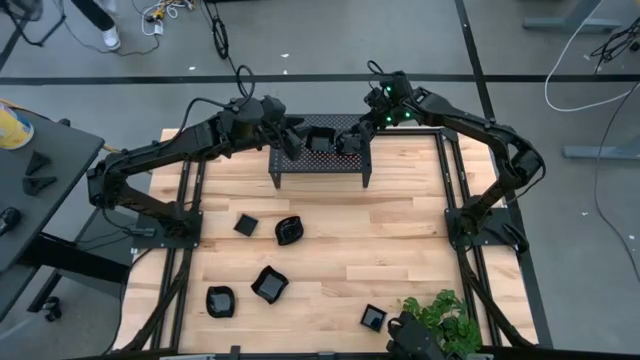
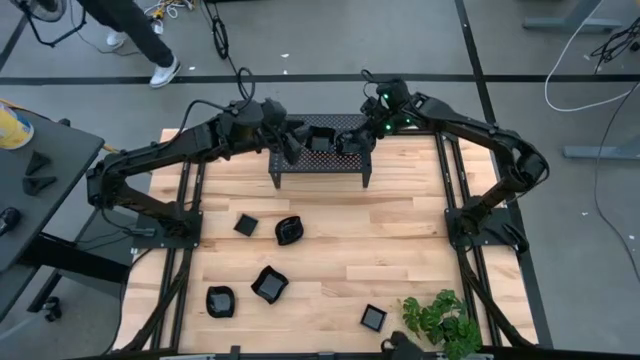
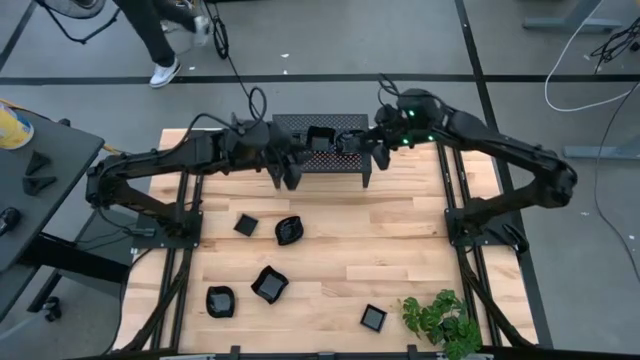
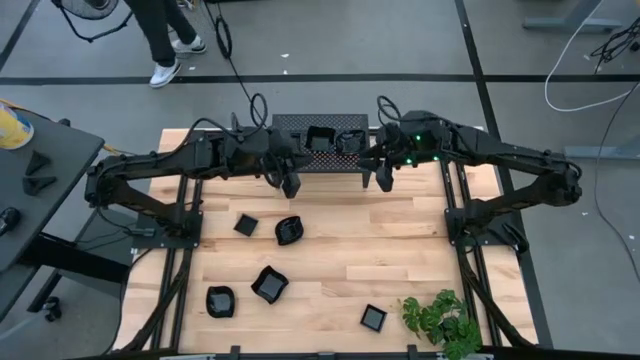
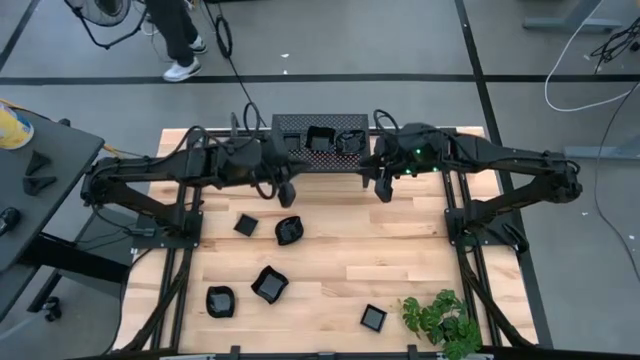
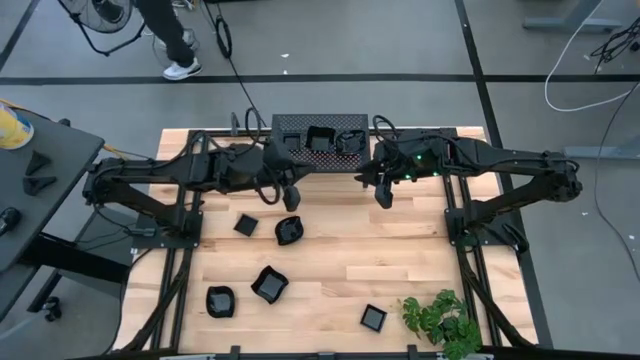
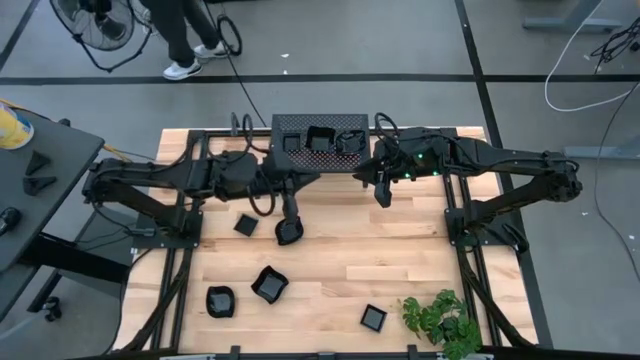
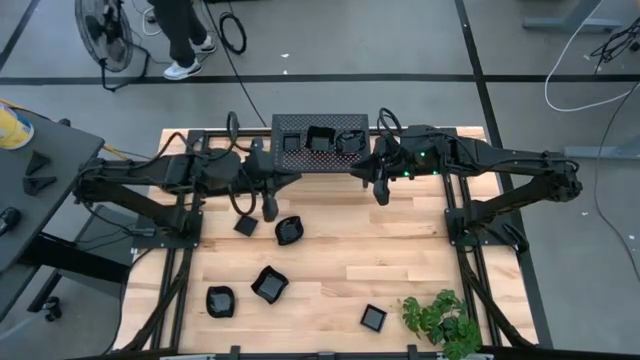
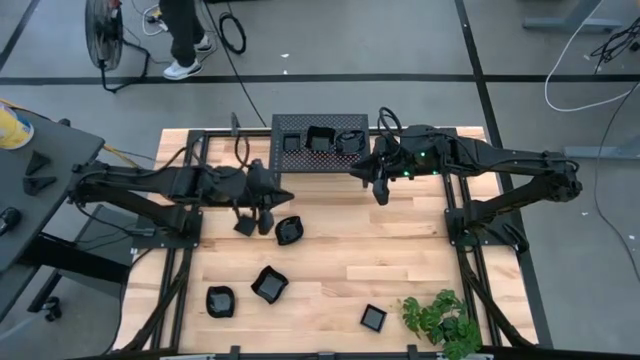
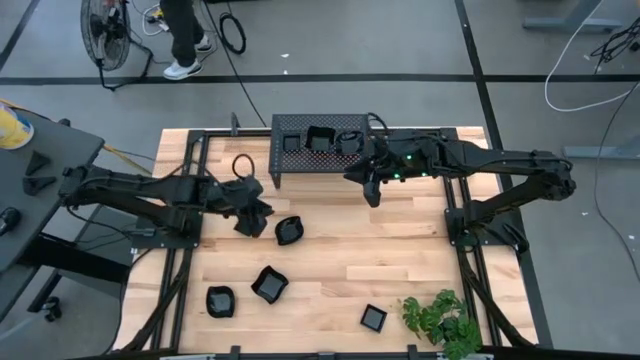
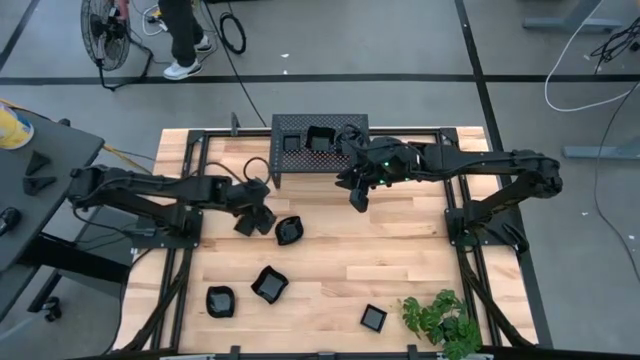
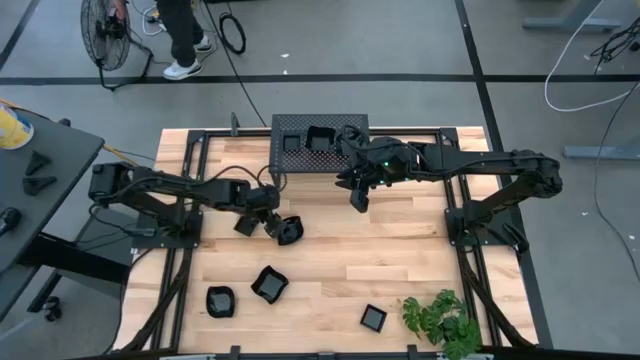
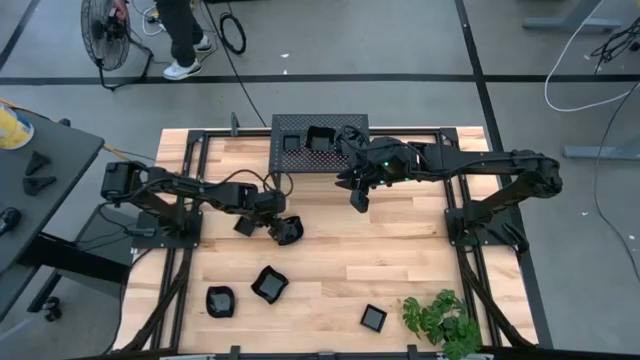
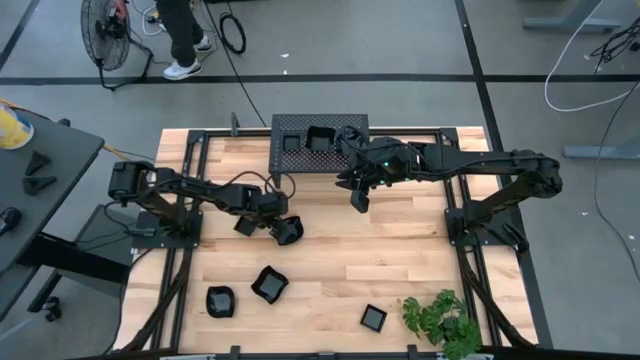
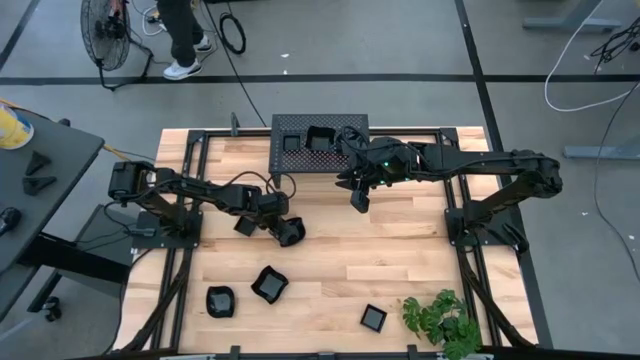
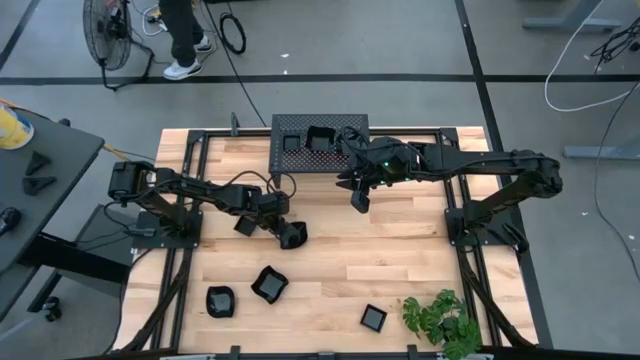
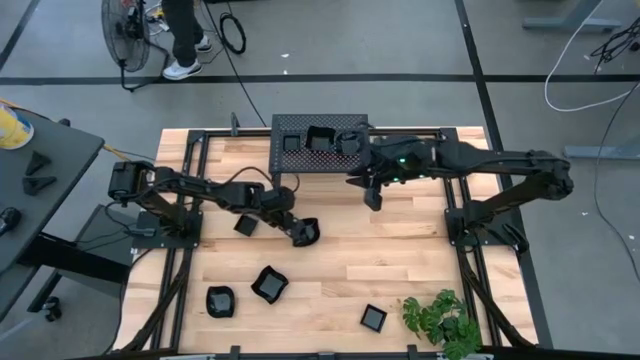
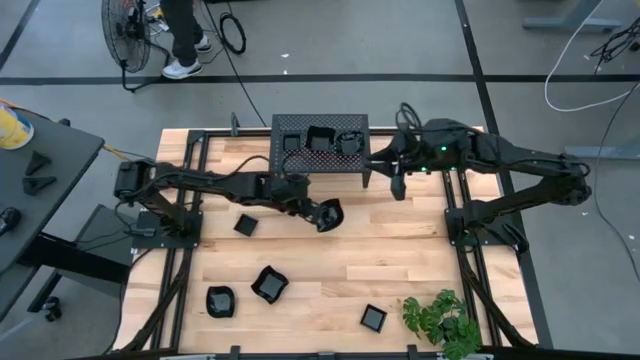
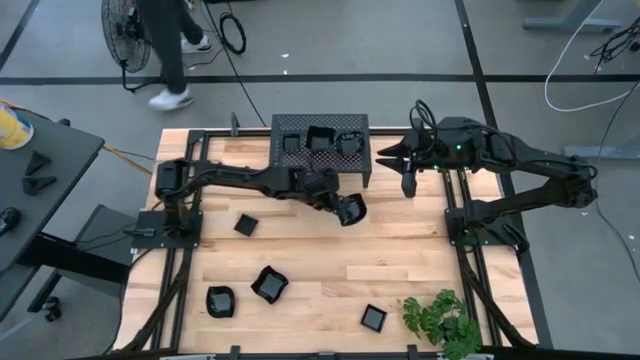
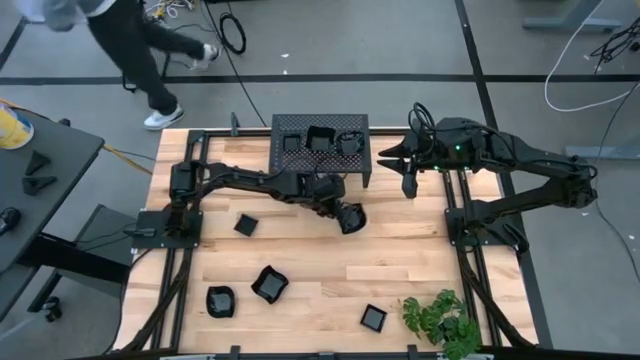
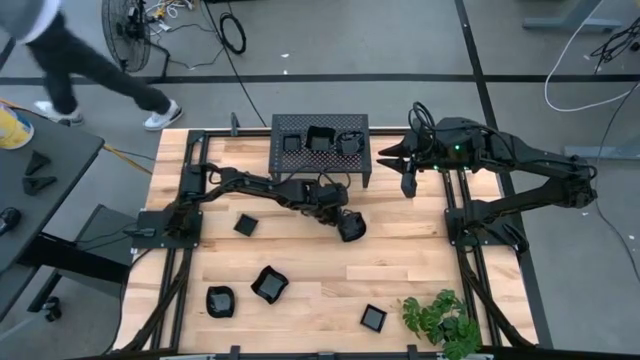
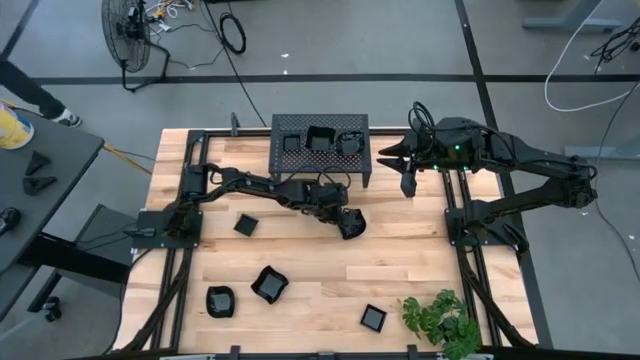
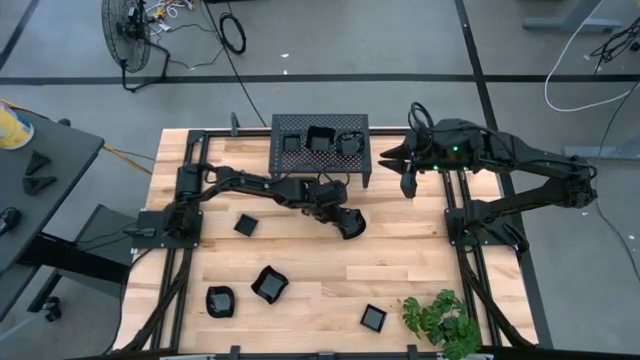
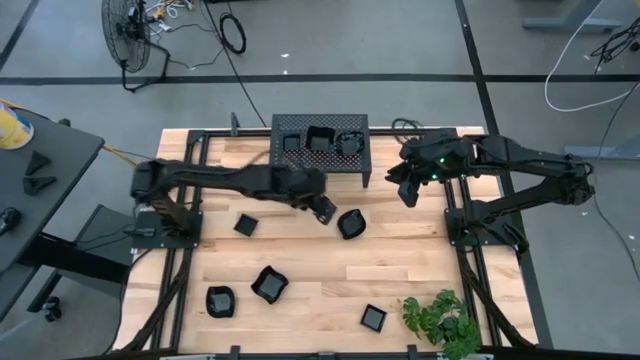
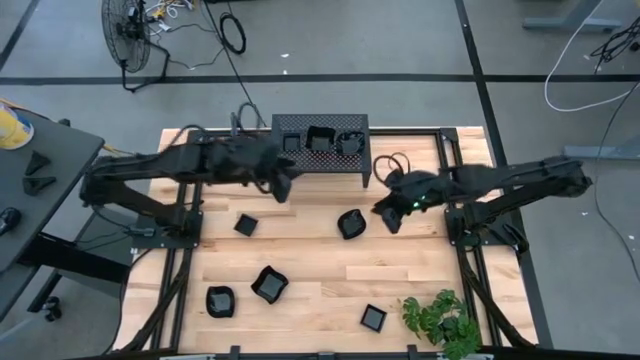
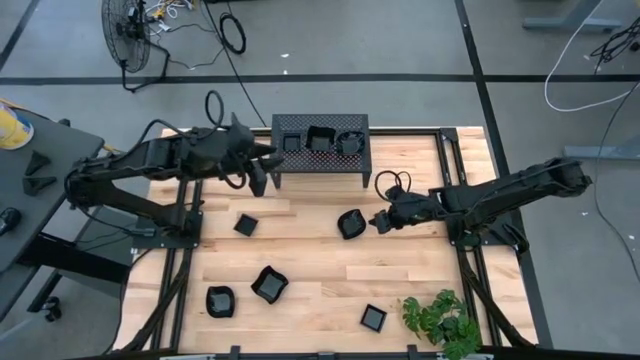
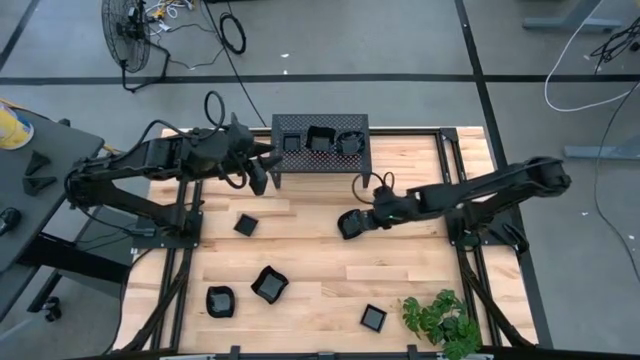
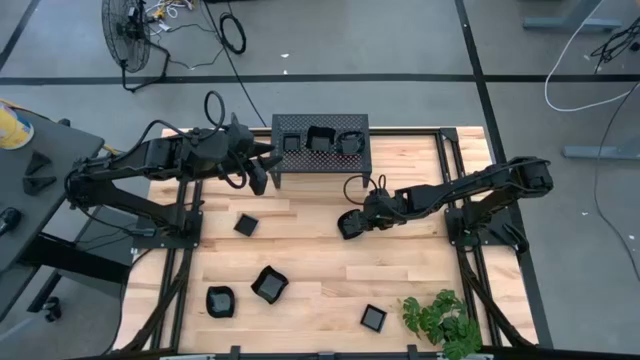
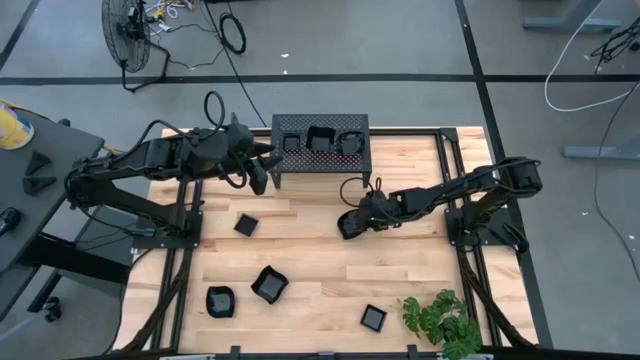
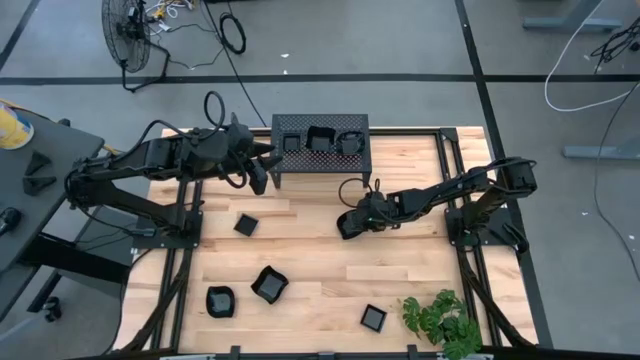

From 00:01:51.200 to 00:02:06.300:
Task: Pick & Place Mini shaped plates
Stack the leaf shaped plate on top of the other leaf shaped plate on the shelf

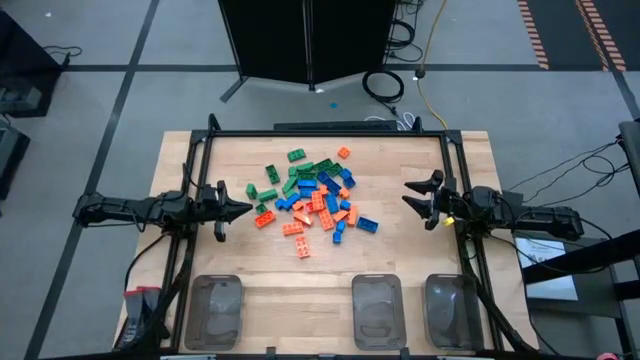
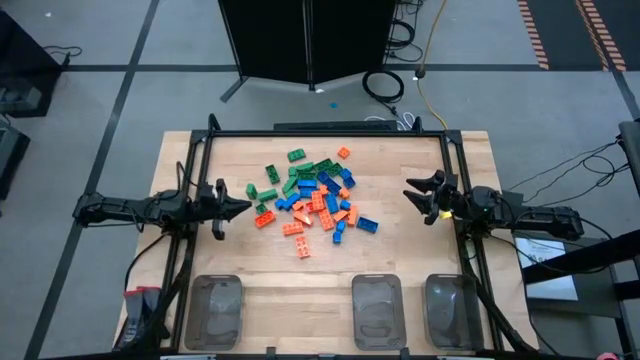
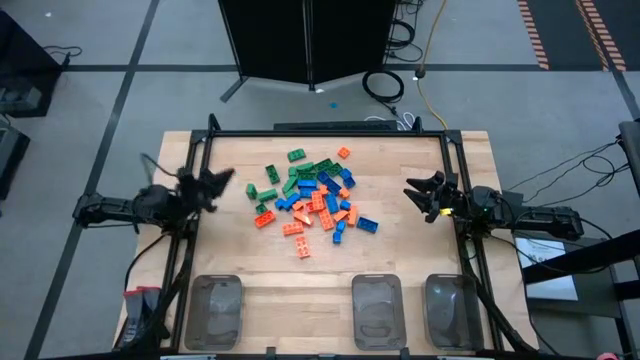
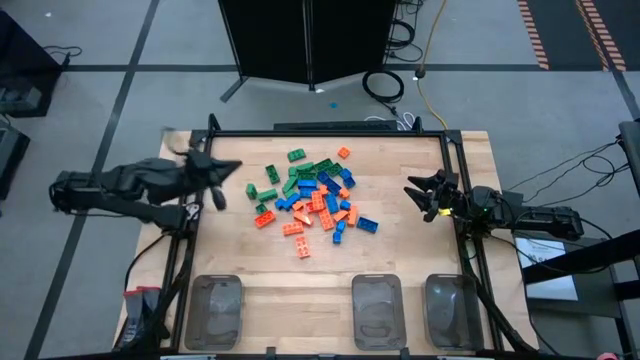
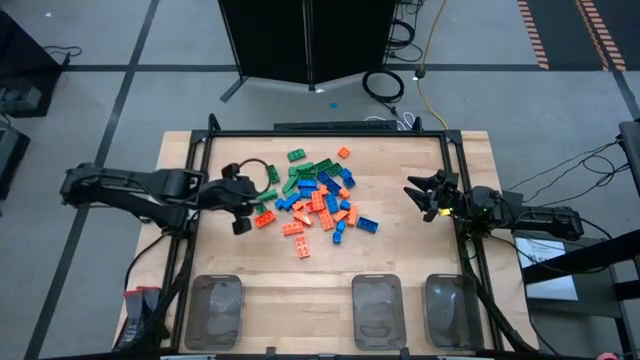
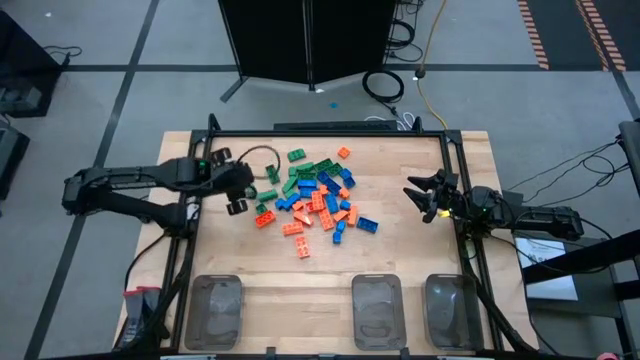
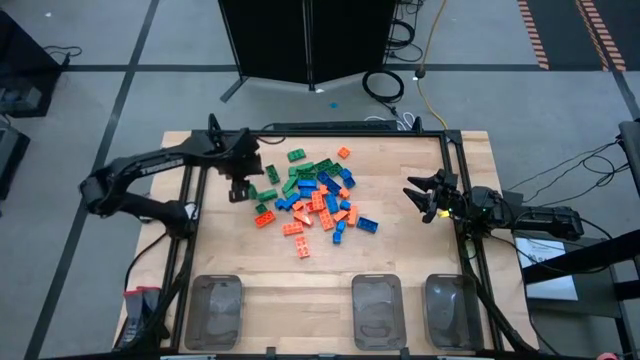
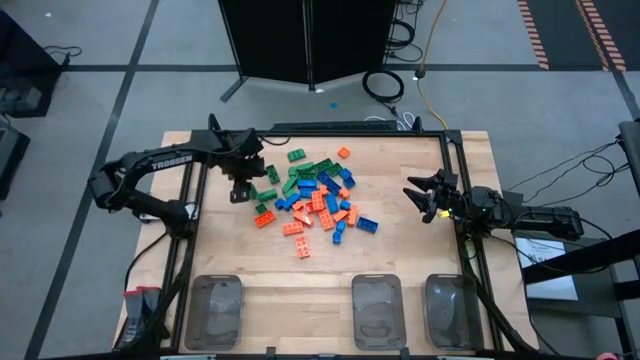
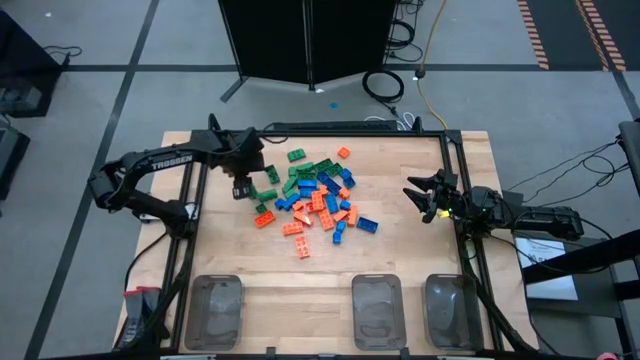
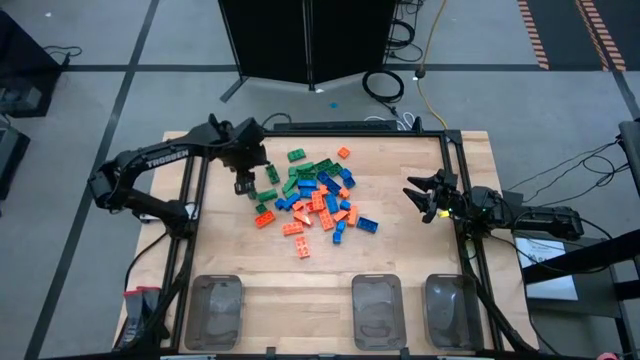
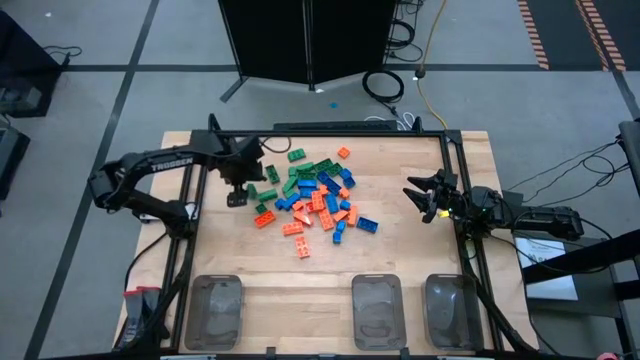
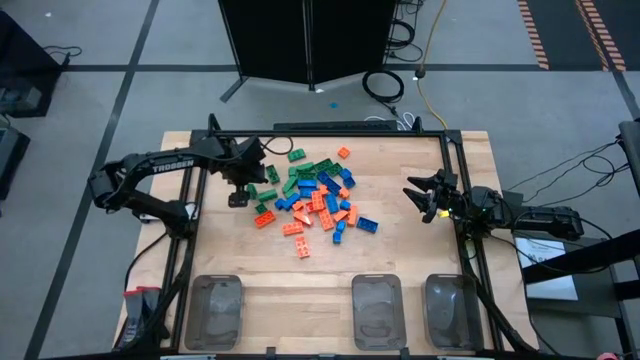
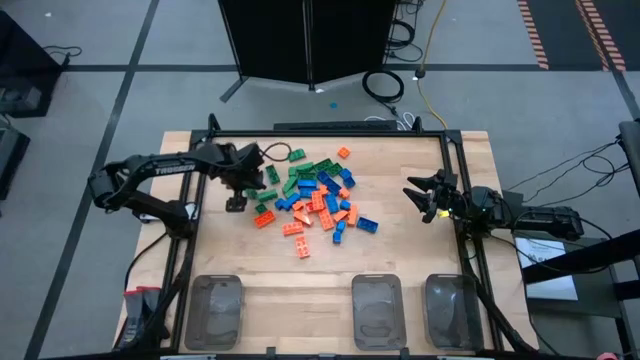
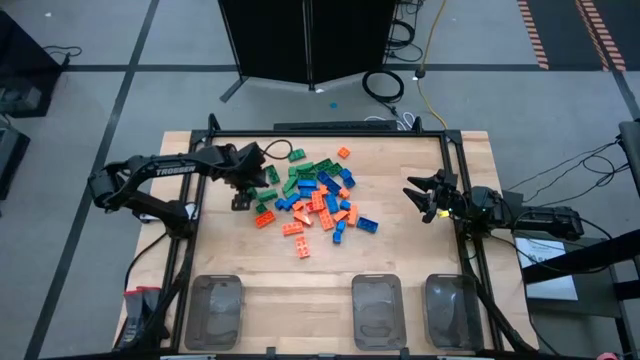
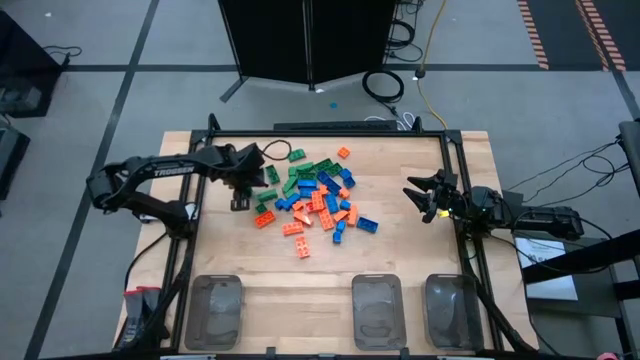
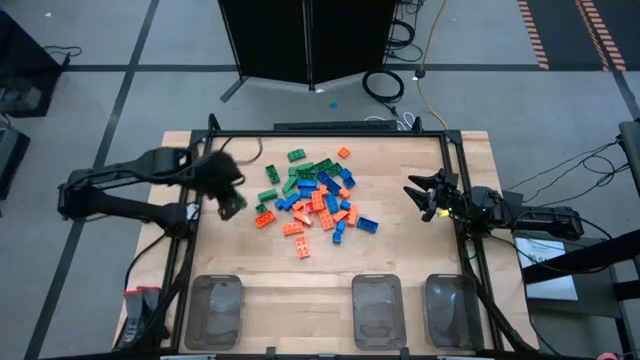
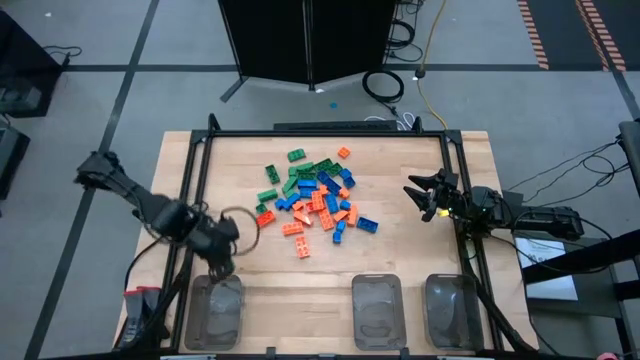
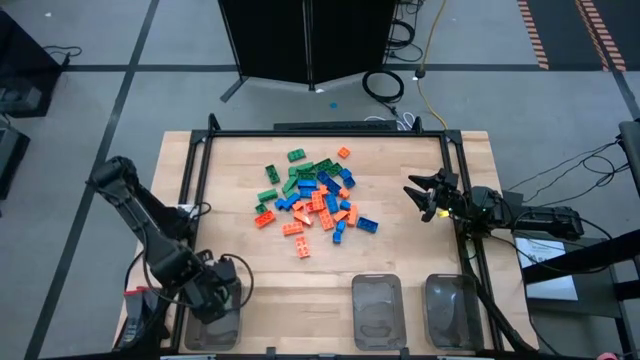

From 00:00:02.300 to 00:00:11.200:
Task: Sort blocks
Put the green game piece into the left black bin
